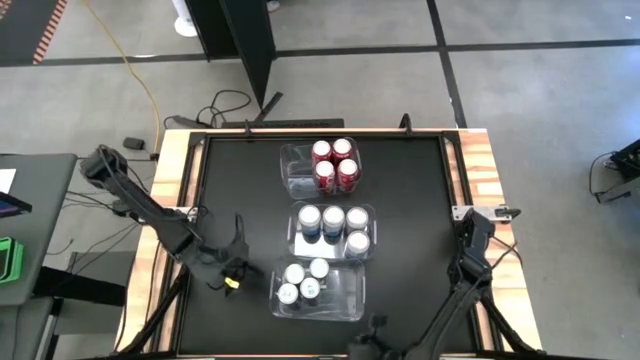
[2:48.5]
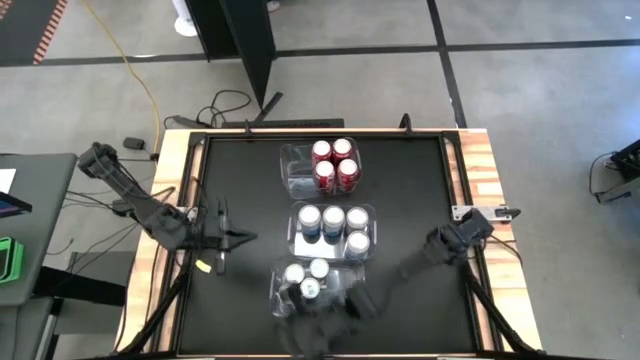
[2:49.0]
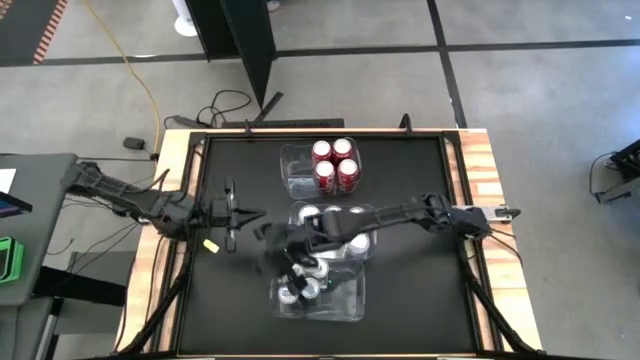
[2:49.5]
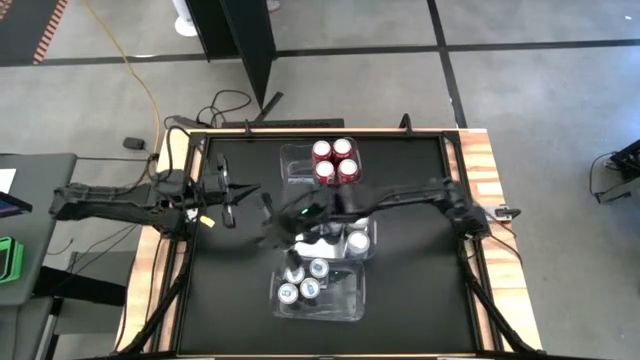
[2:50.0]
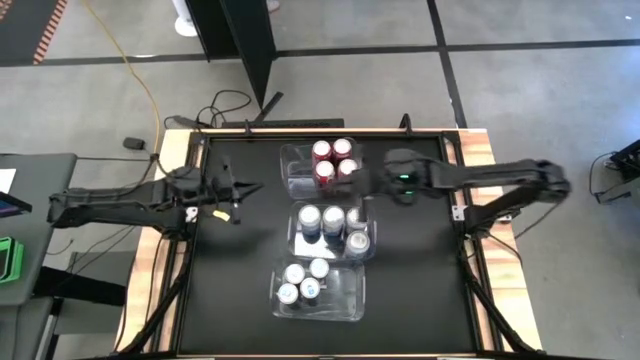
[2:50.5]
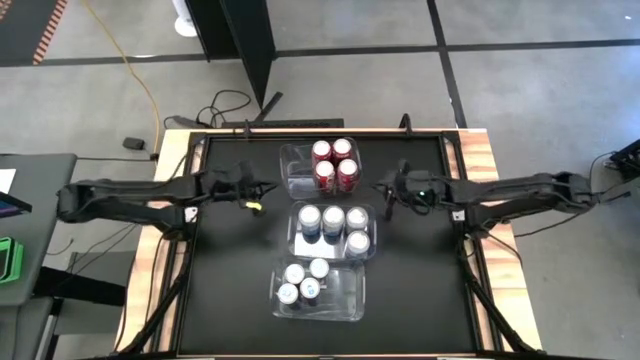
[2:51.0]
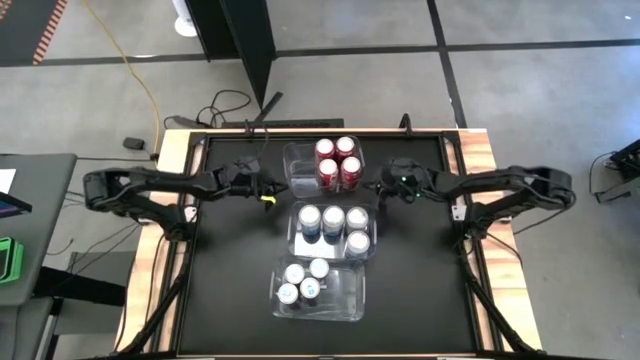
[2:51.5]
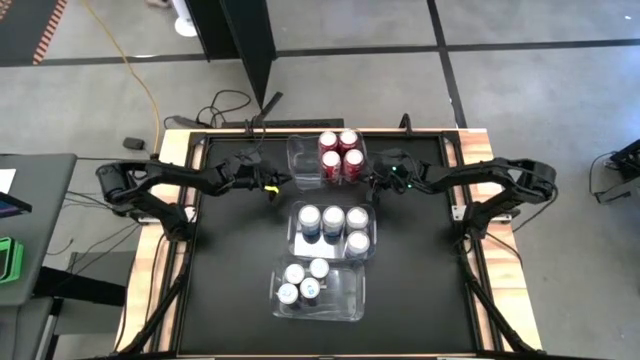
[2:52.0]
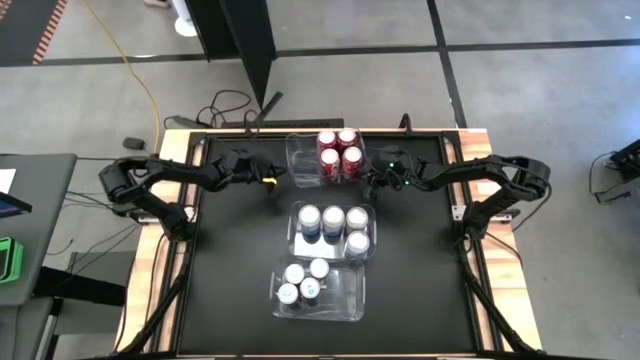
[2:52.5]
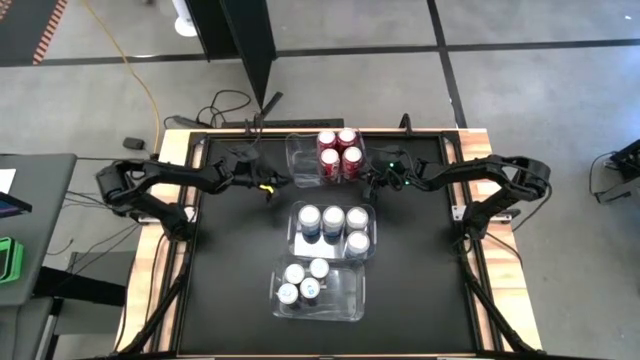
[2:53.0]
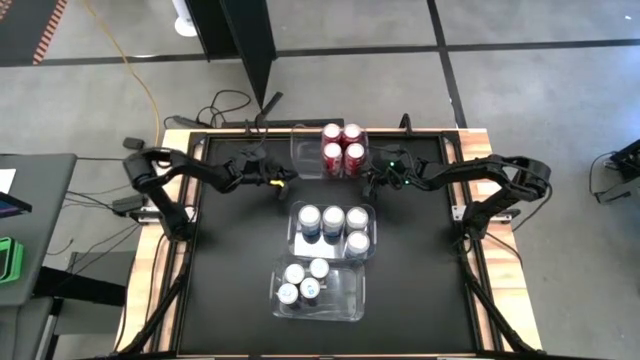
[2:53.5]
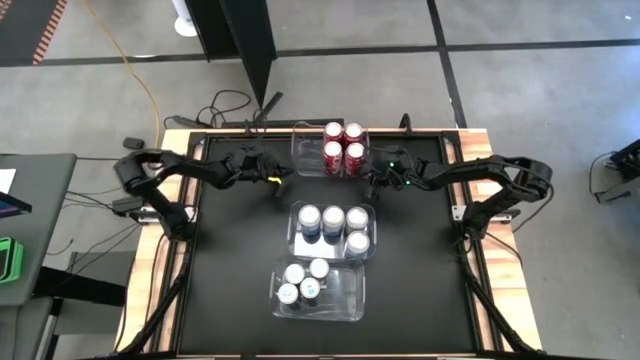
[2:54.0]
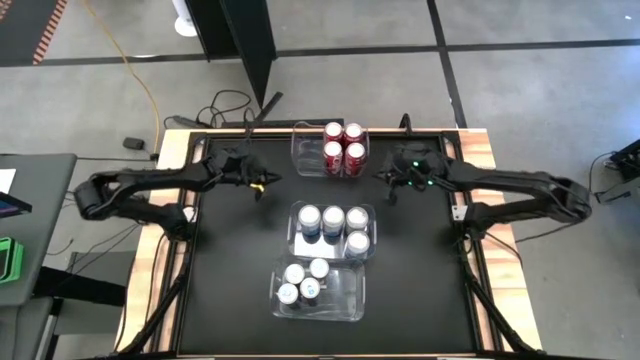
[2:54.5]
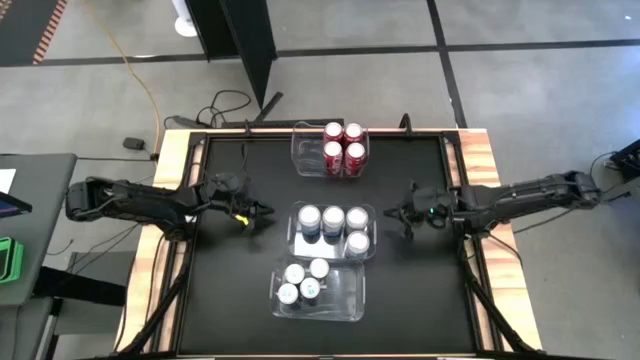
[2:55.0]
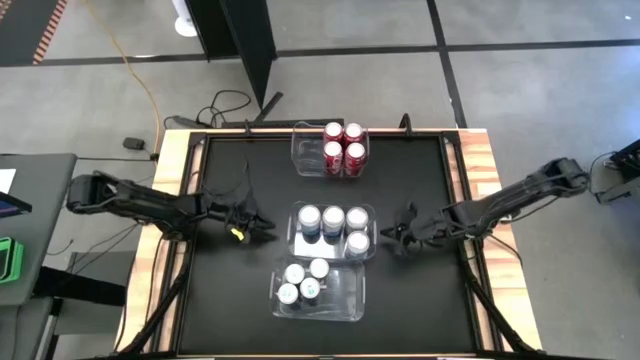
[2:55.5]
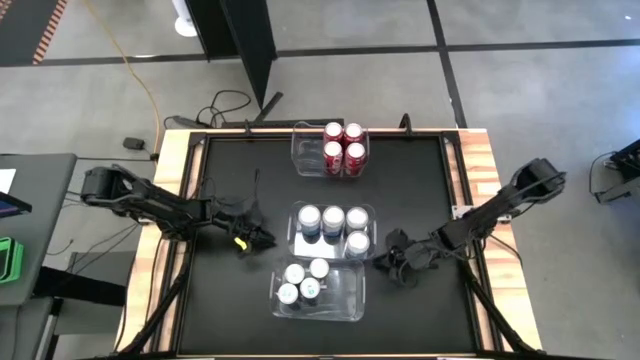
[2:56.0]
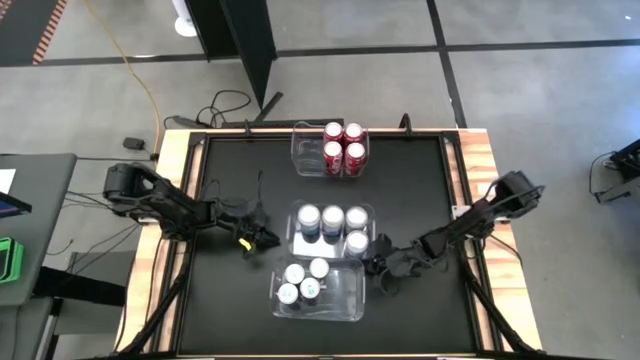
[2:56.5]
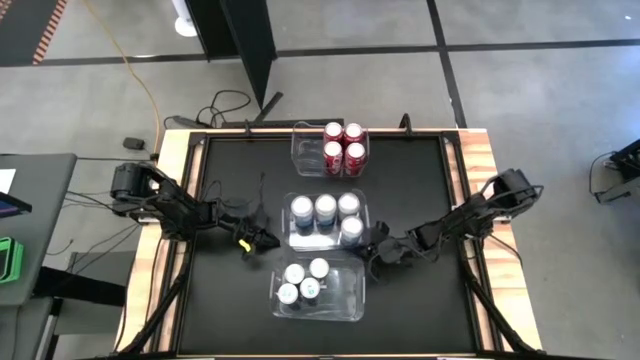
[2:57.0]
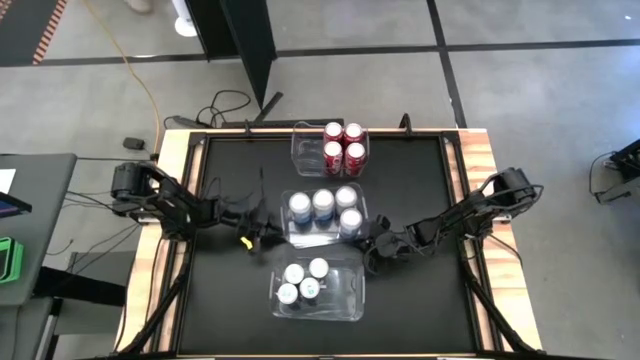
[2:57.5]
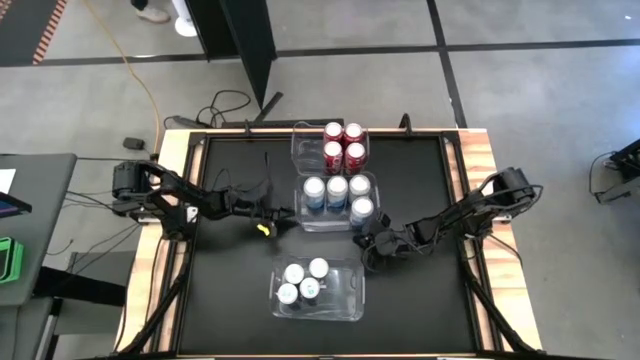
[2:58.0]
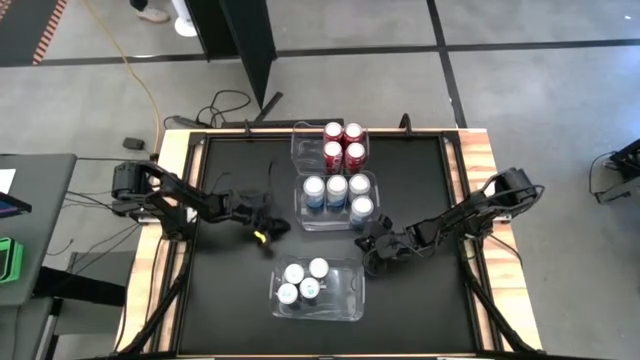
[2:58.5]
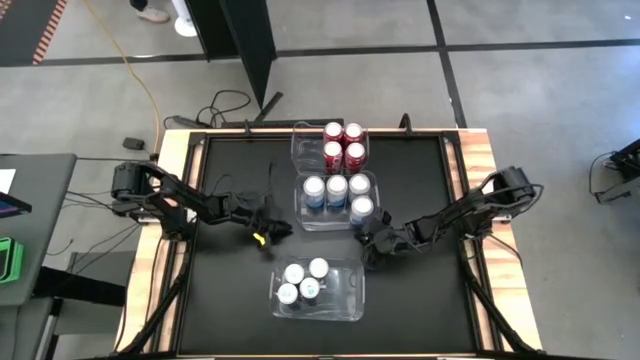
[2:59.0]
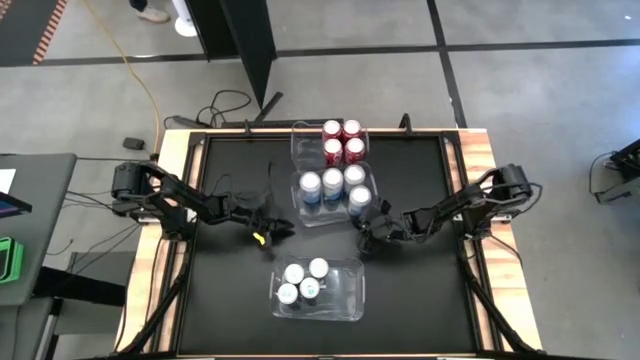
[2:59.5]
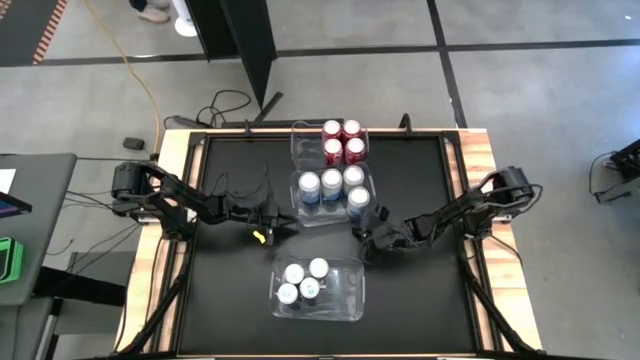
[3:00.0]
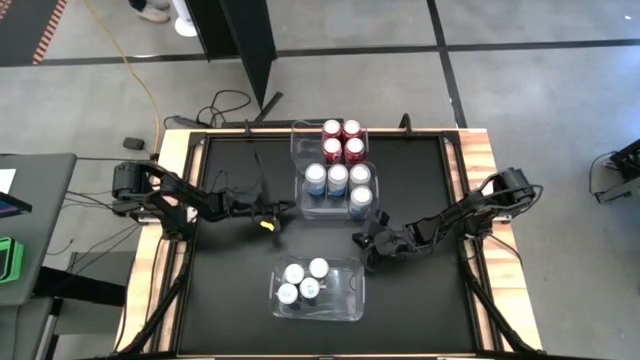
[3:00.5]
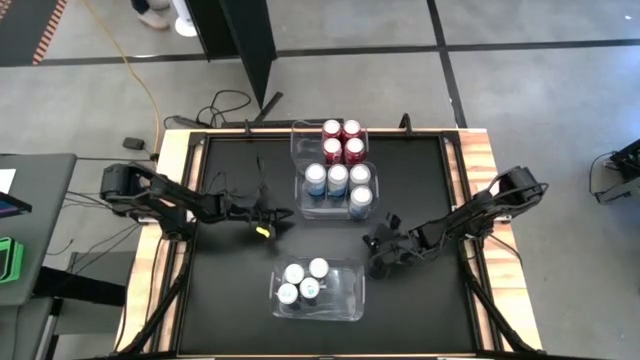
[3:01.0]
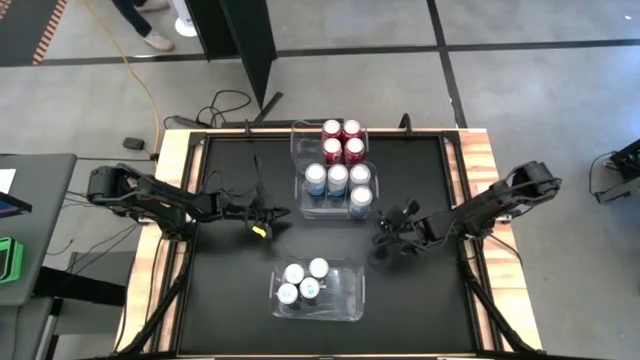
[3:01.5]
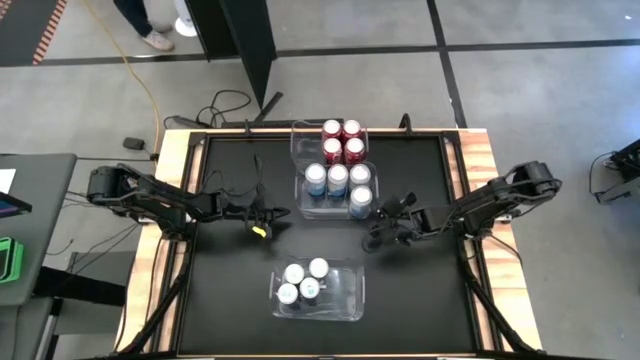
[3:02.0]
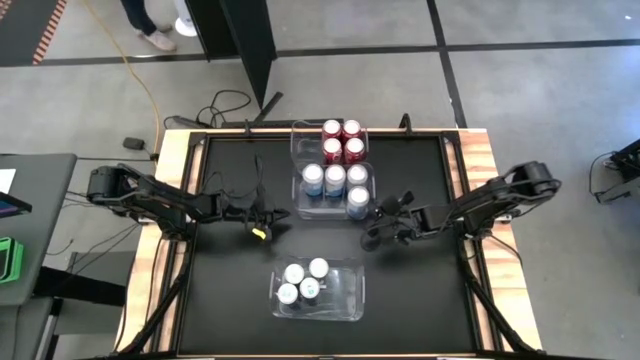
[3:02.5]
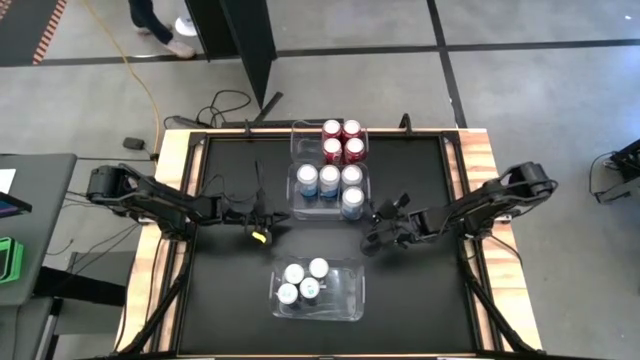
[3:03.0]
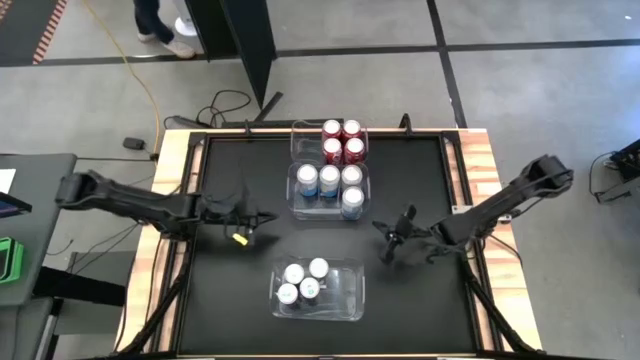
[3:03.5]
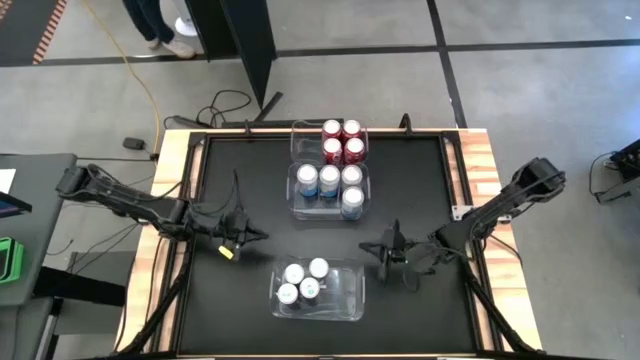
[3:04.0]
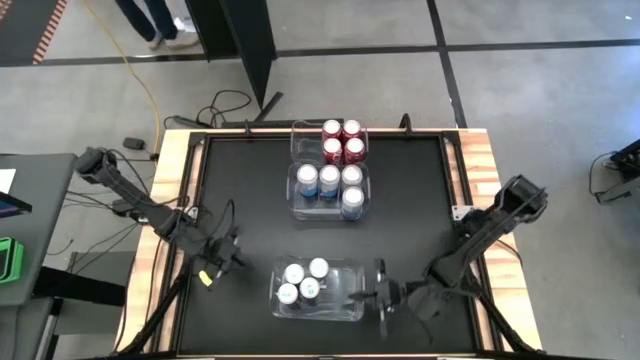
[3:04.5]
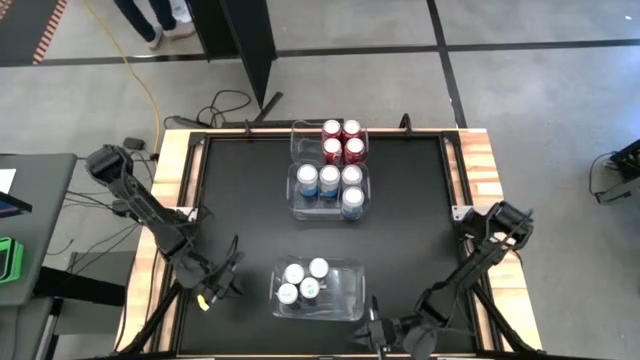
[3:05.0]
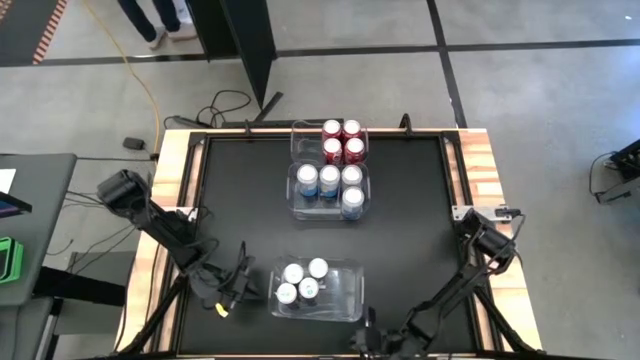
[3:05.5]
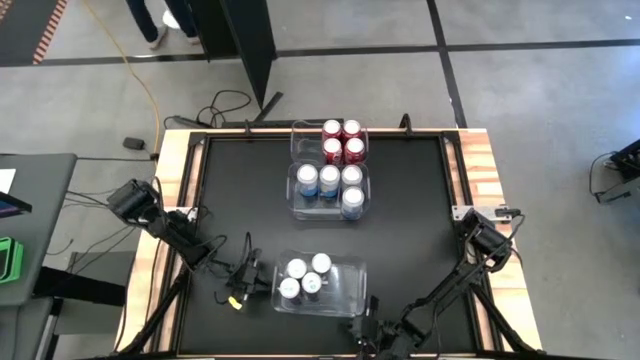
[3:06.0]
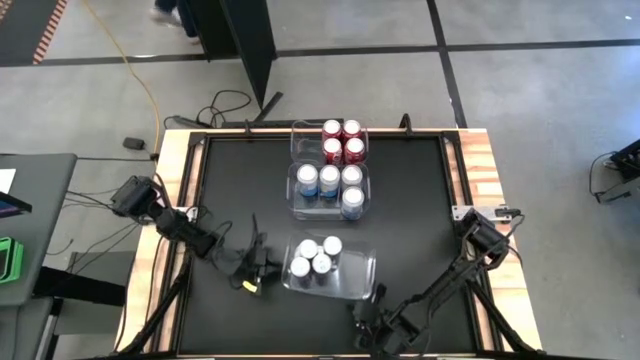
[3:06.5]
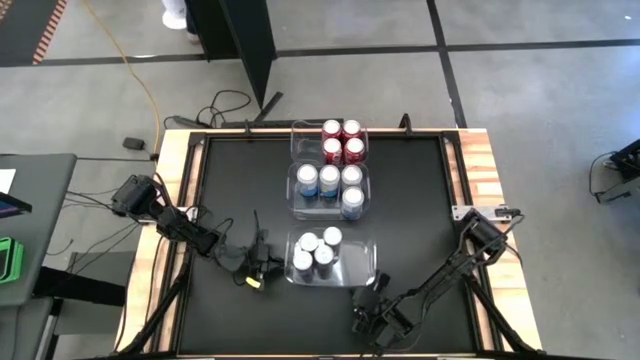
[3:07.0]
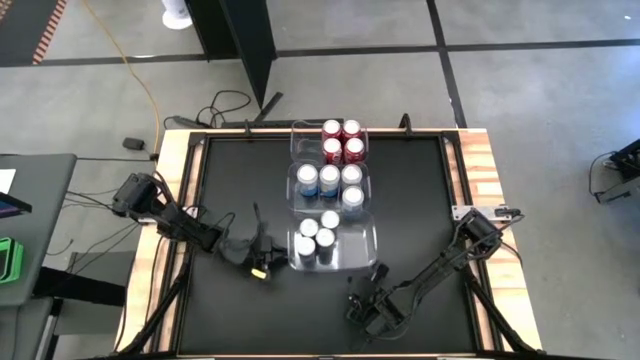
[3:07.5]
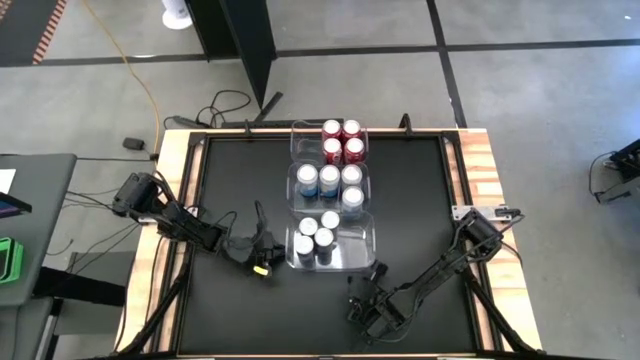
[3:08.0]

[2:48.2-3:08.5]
Task: Sort soda cans
Adjust the transparent bins

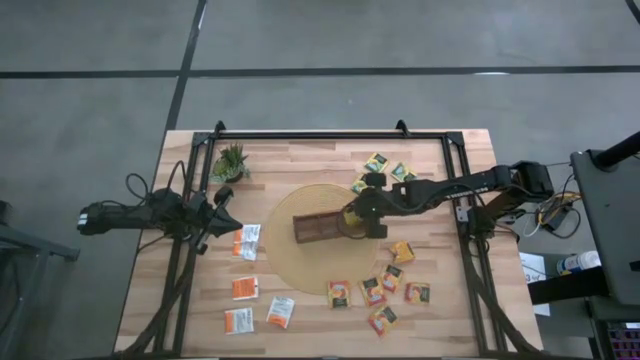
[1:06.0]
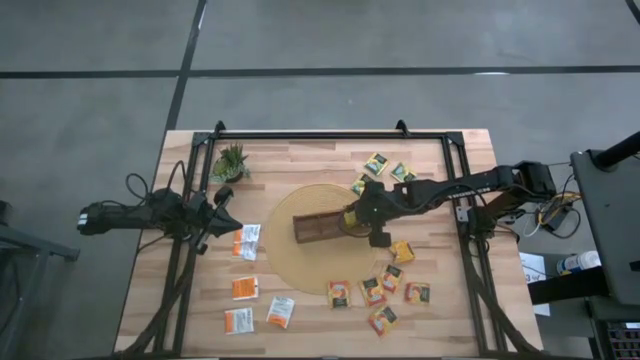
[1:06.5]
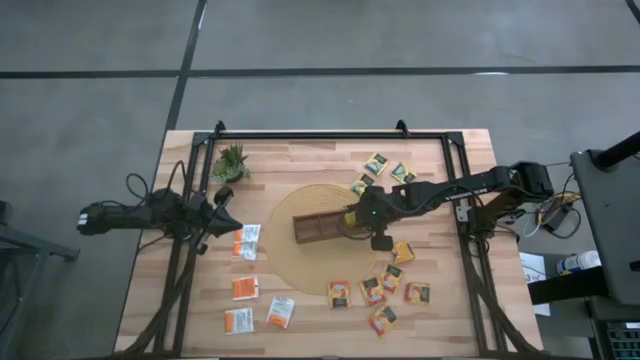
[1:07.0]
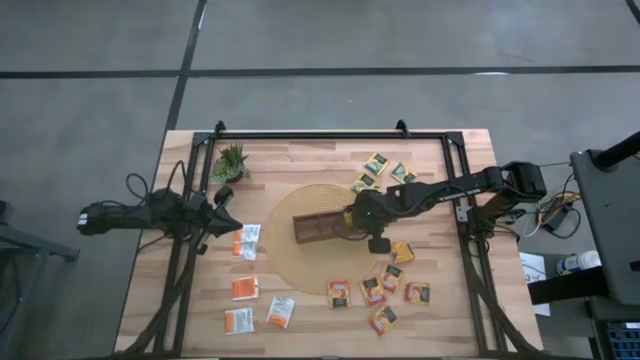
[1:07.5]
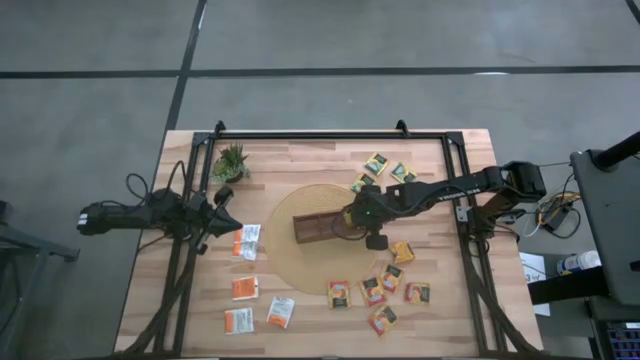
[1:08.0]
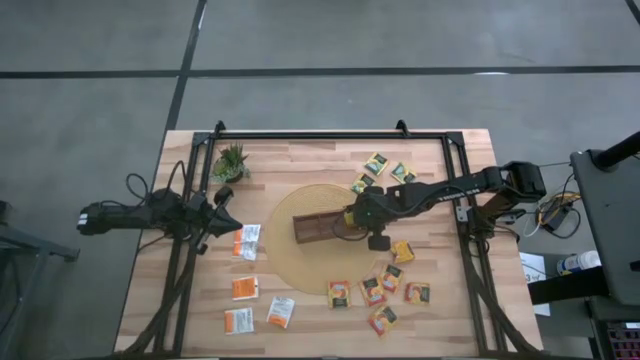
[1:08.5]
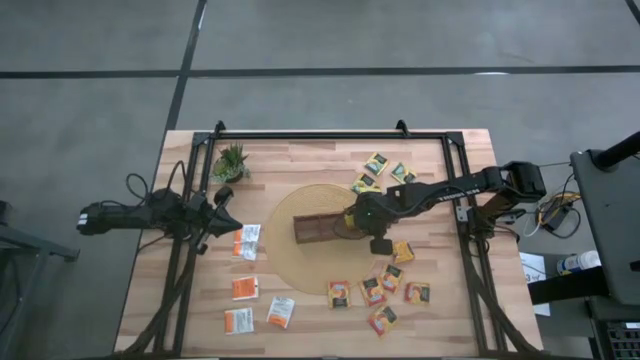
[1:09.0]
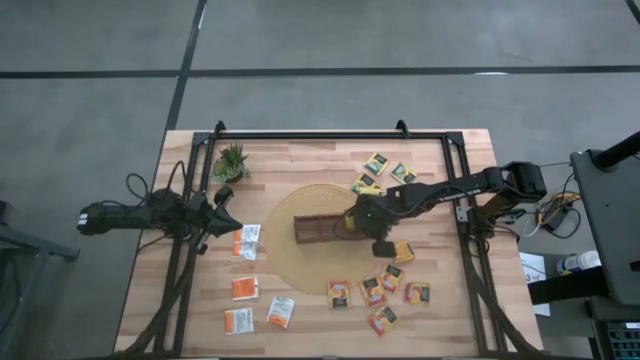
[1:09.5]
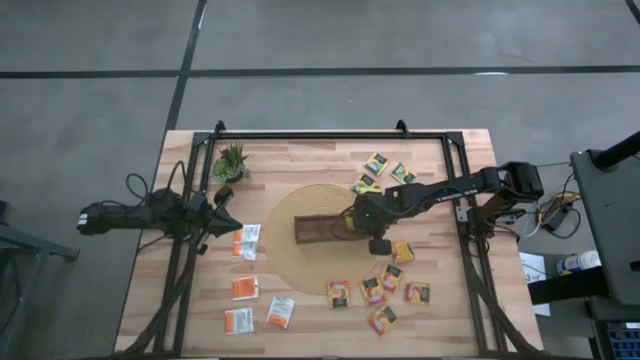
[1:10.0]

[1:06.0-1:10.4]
Task: Pick & Place Tea
Adjust the wooden organizer
